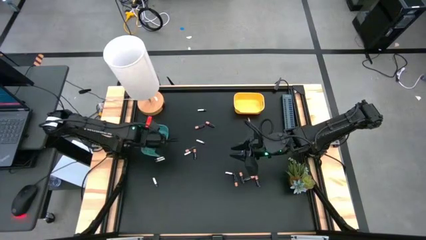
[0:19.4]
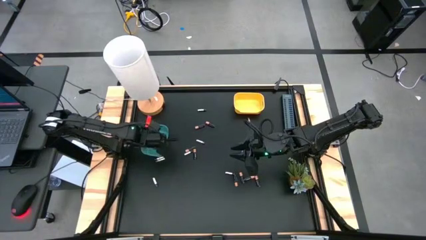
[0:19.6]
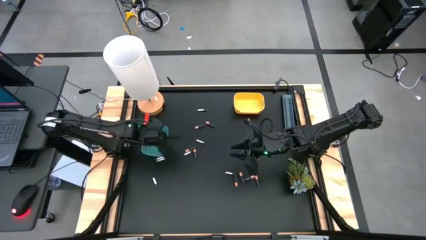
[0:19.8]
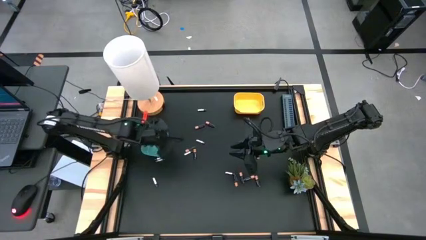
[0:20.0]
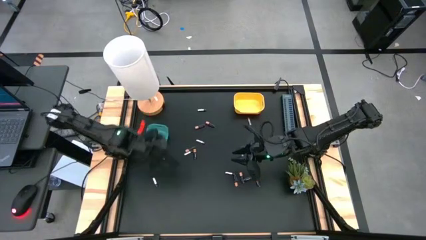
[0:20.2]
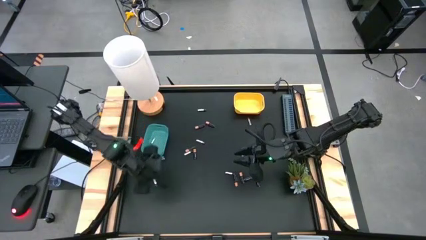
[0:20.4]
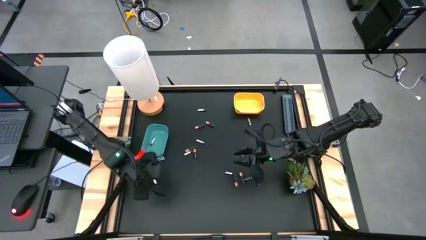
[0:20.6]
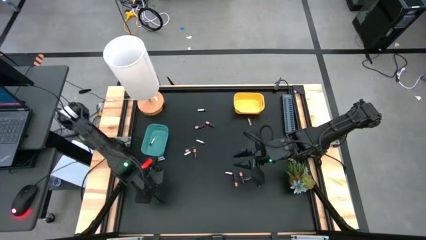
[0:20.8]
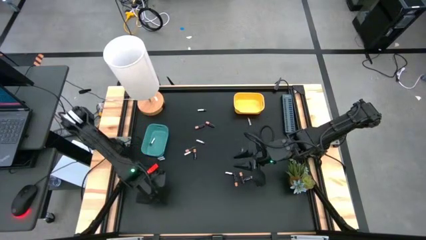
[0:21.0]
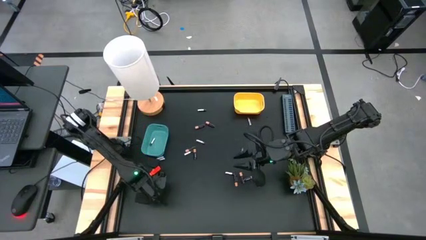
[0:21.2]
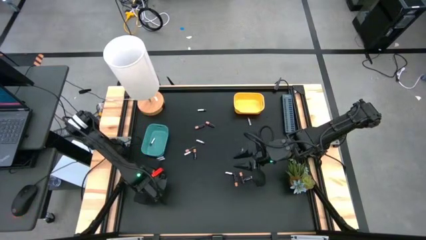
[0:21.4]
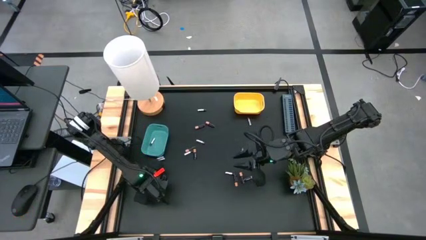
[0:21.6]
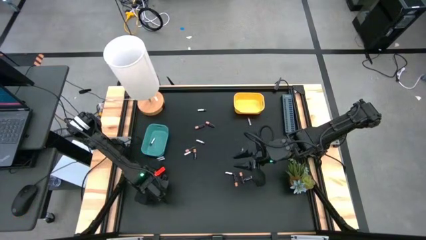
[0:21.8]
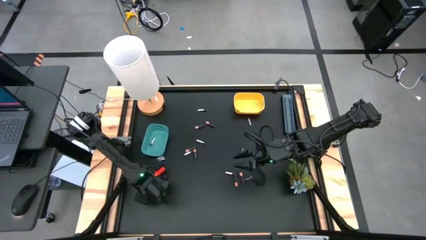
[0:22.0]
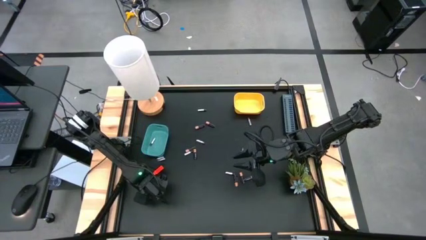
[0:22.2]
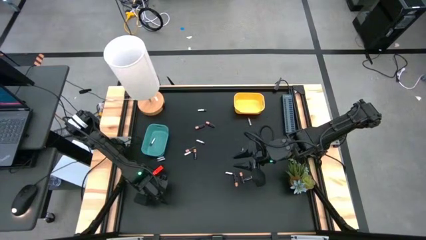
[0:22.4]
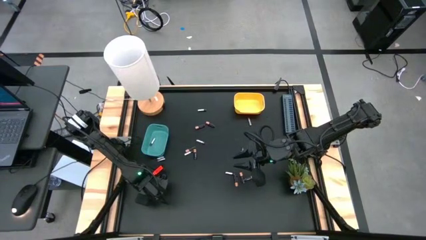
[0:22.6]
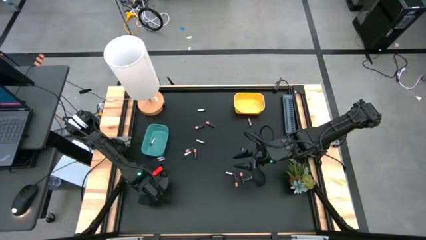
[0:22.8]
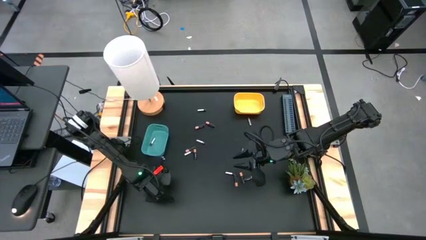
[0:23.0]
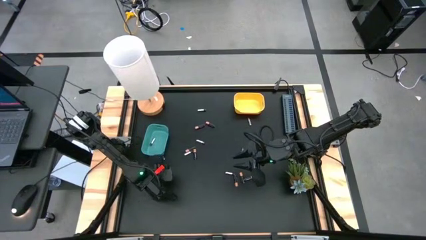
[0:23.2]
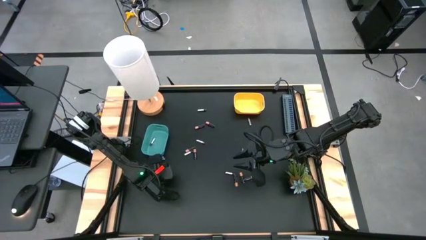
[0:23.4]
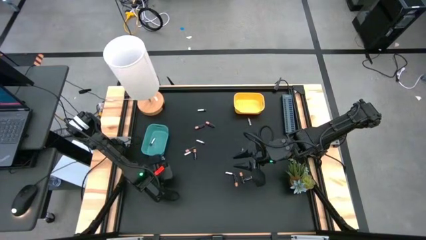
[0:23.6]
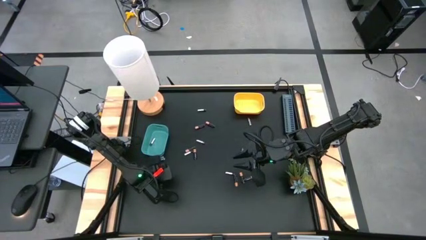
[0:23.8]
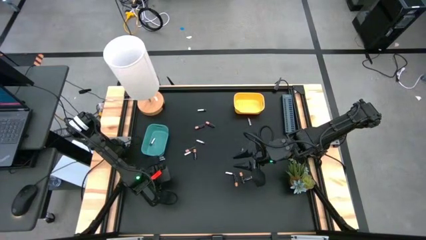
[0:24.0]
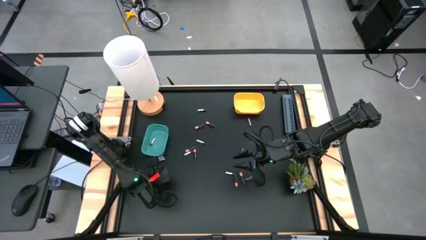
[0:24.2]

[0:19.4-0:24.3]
Task: Sort batteries
Put the silver battery into the green bin

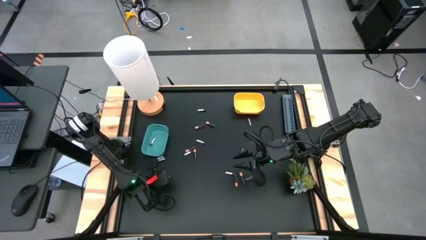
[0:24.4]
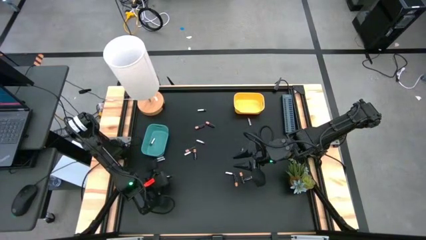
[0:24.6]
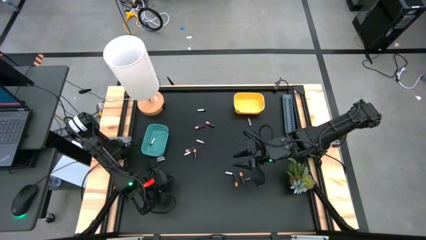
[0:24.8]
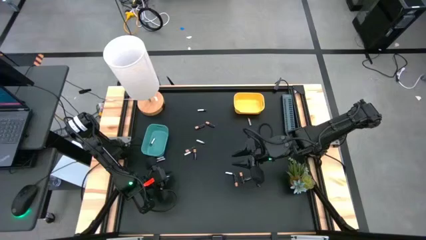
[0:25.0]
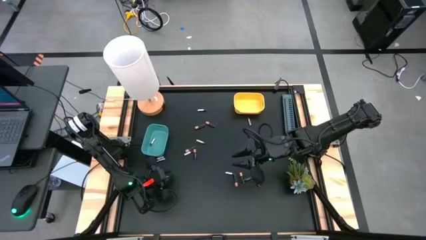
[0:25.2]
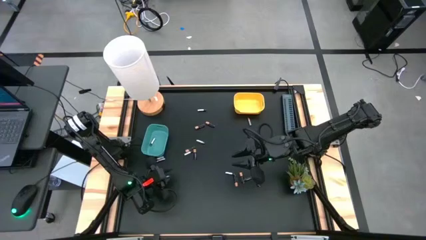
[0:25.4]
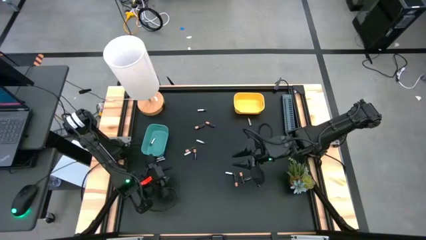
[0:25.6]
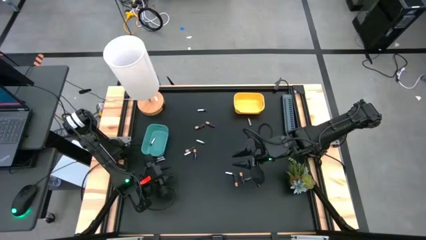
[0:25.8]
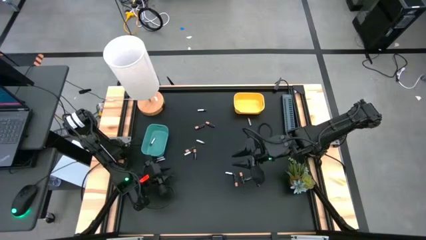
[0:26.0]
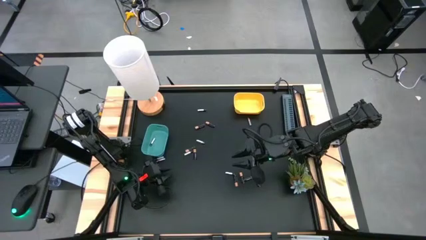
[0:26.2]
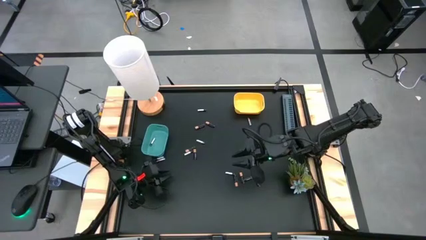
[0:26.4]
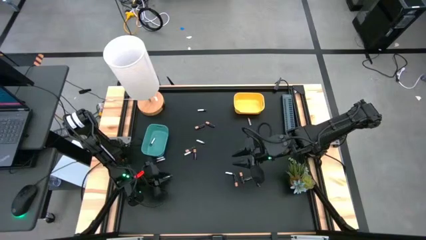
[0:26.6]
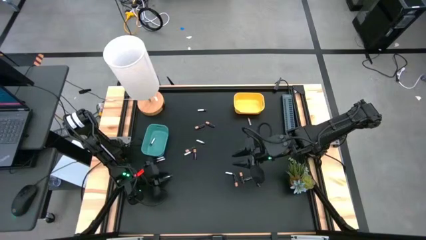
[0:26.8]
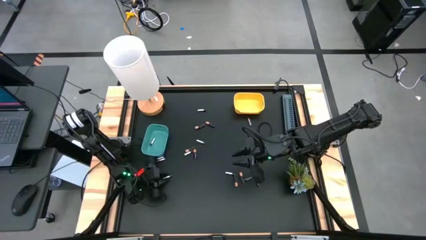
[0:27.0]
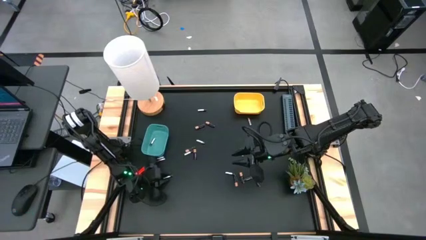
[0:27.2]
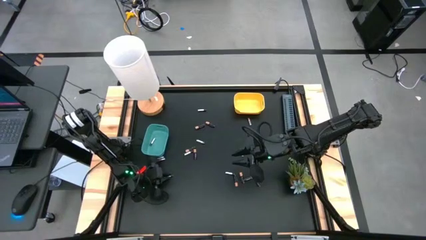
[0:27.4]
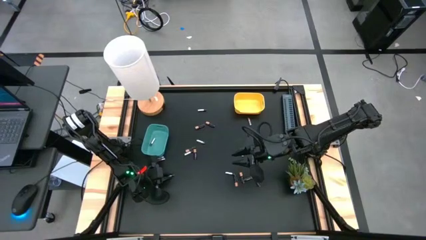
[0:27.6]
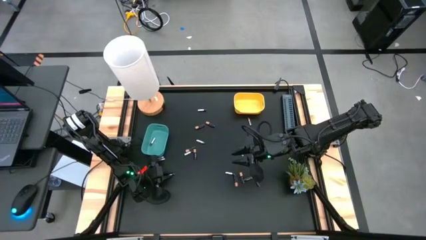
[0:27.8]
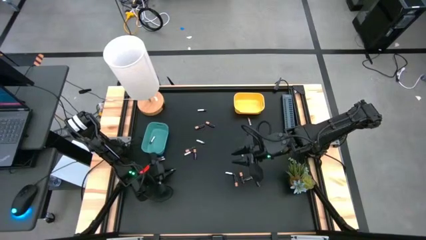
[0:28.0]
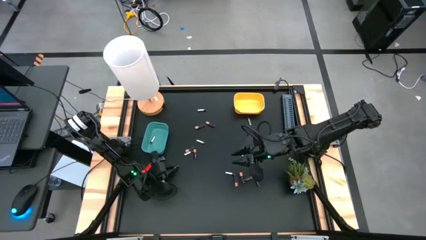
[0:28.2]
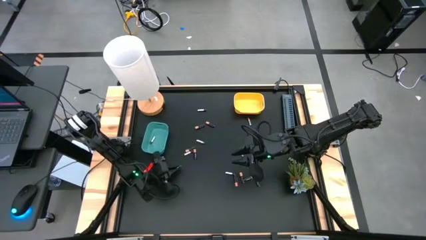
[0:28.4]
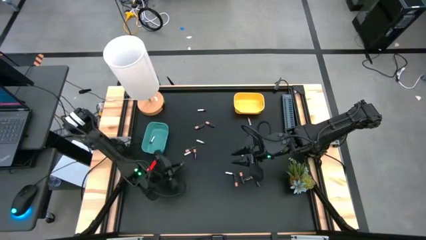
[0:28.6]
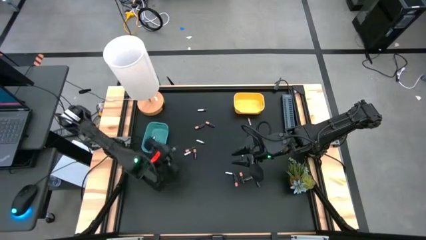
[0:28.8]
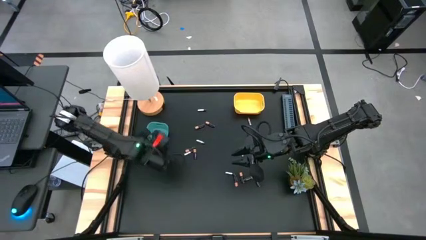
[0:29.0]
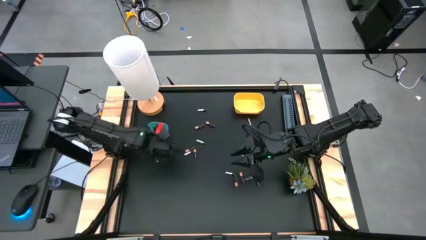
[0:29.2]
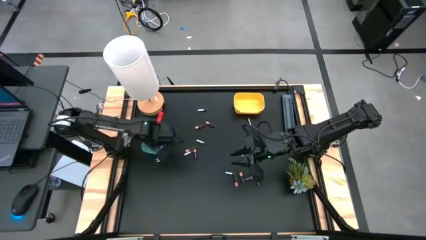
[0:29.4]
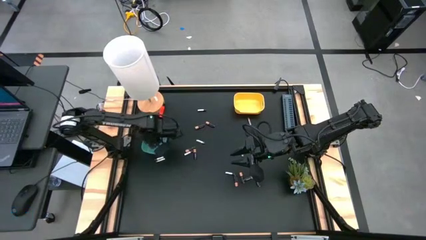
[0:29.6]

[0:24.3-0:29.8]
Put the silver battery into the green bin

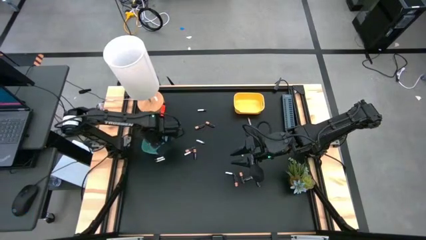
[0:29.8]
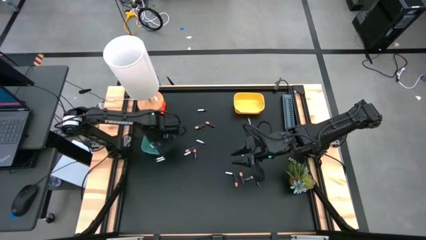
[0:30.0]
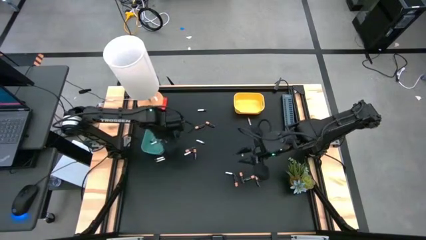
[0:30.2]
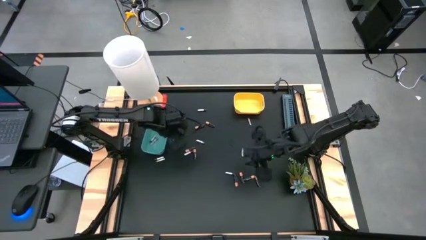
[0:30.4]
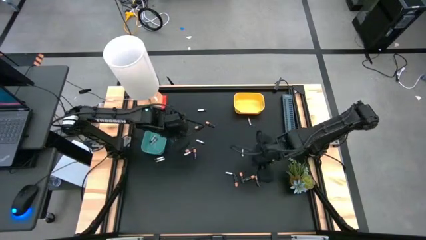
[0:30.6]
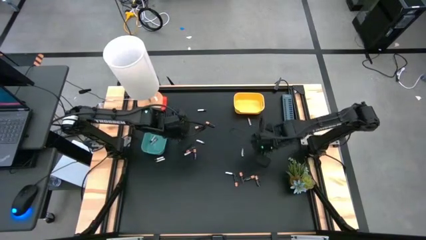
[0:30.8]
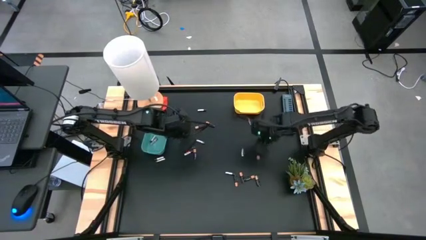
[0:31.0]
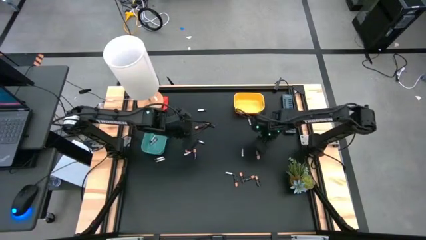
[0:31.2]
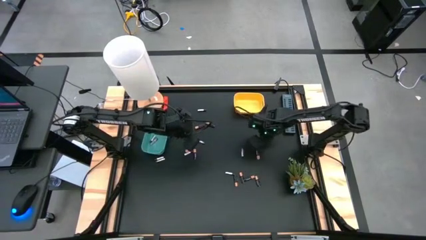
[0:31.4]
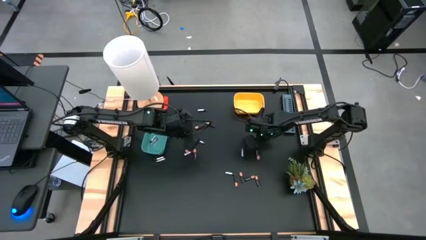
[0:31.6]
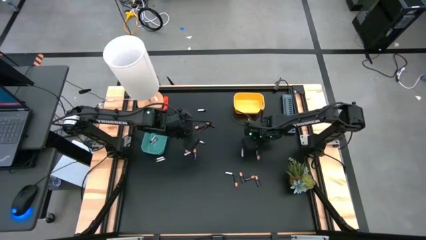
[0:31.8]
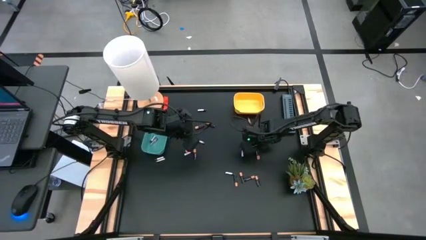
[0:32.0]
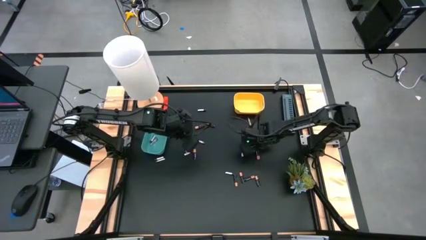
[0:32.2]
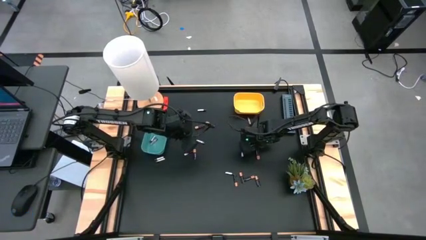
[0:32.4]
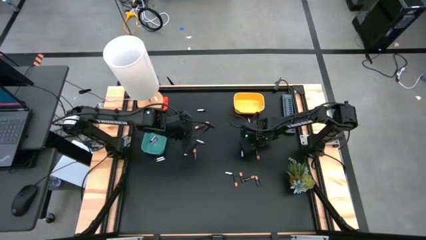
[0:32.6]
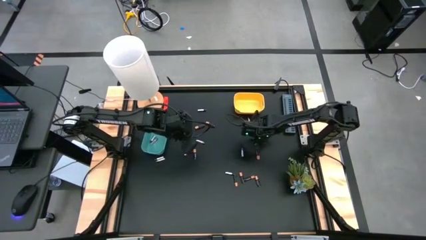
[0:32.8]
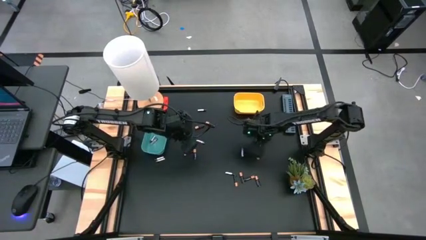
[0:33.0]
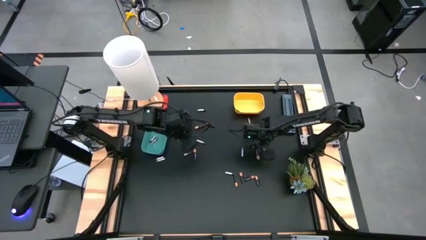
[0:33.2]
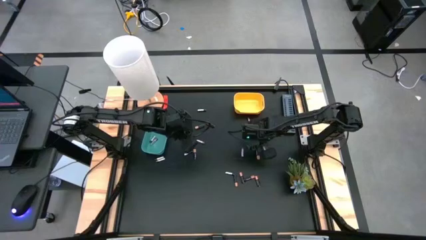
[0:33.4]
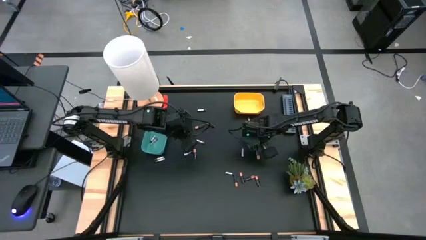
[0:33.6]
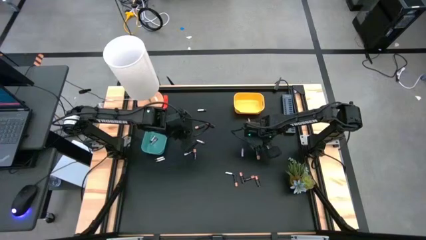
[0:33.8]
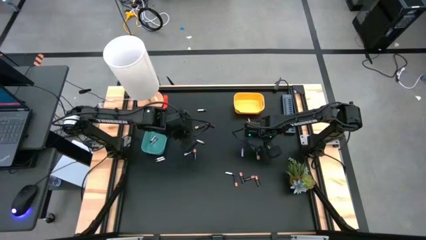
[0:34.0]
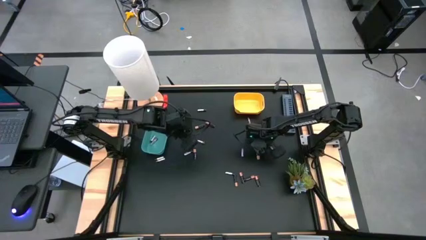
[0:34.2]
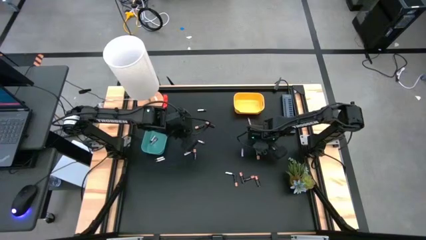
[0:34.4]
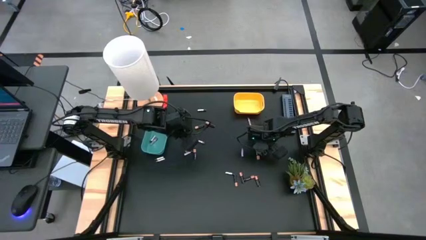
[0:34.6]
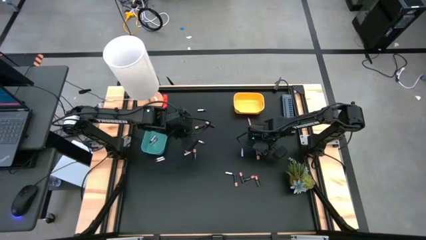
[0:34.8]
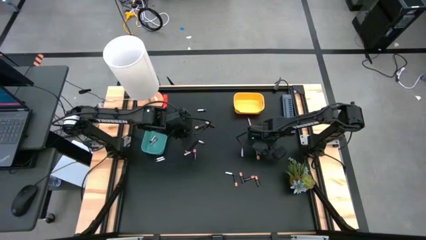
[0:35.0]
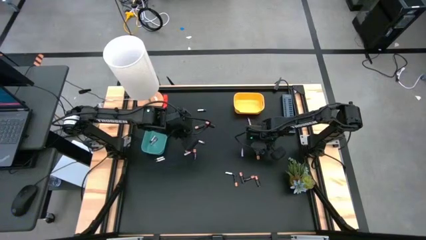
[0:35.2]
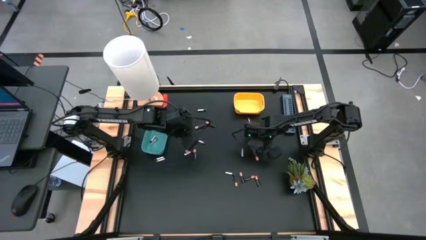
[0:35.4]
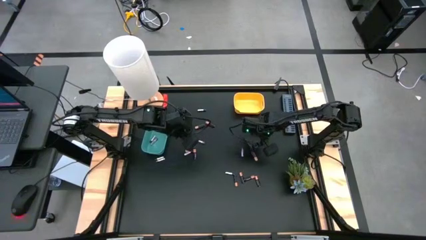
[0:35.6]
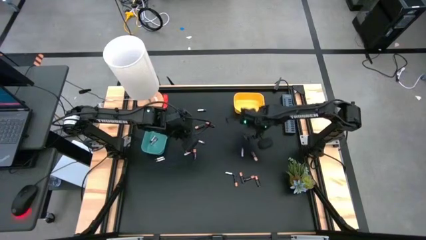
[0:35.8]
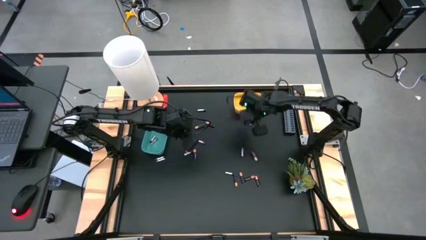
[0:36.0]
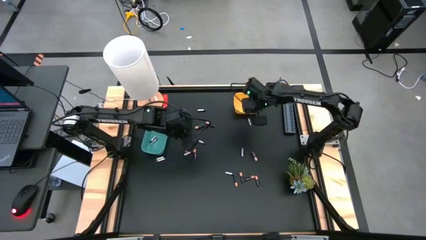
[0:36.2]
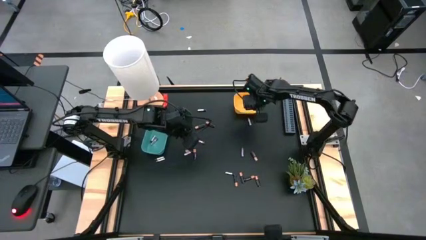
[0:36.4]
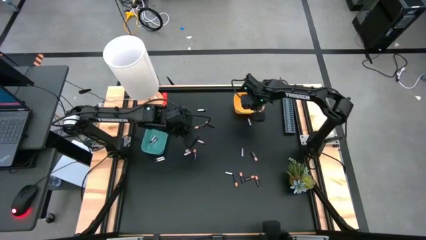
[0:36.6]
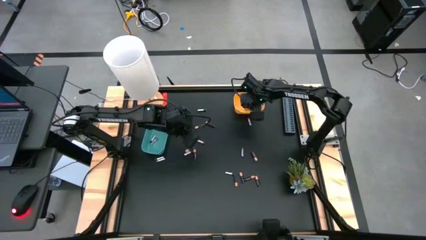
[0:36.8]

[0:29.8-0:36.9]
Put the black battery into the yellow bin
